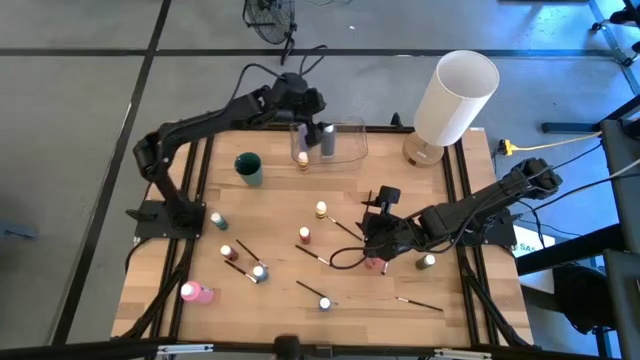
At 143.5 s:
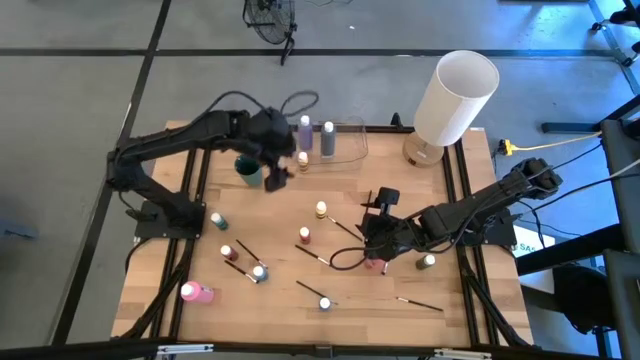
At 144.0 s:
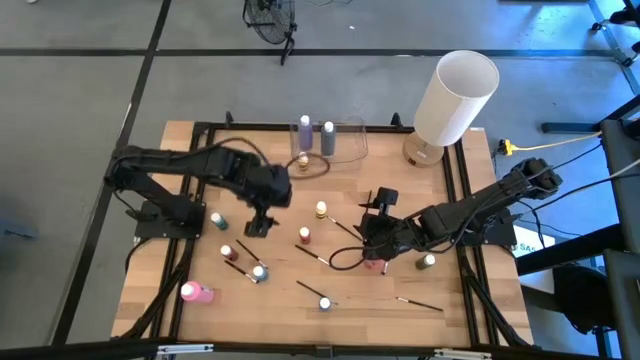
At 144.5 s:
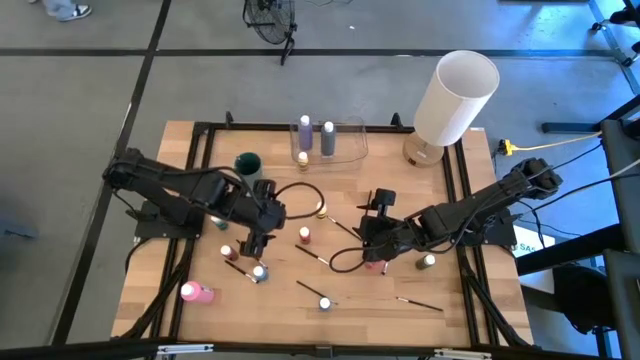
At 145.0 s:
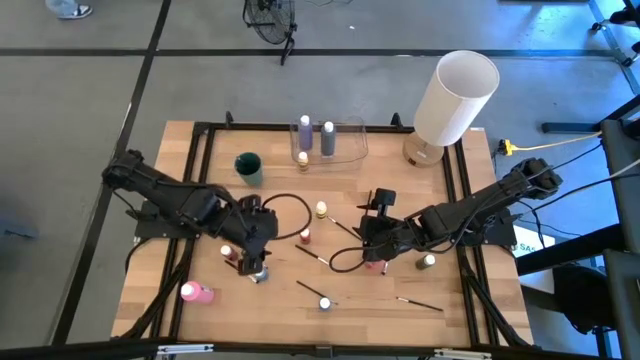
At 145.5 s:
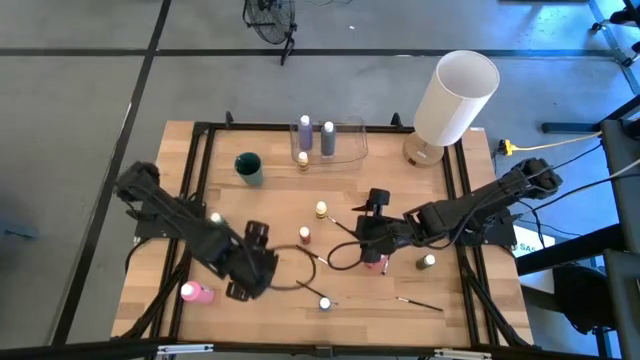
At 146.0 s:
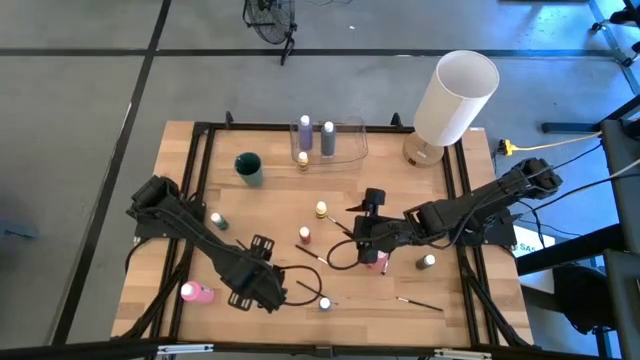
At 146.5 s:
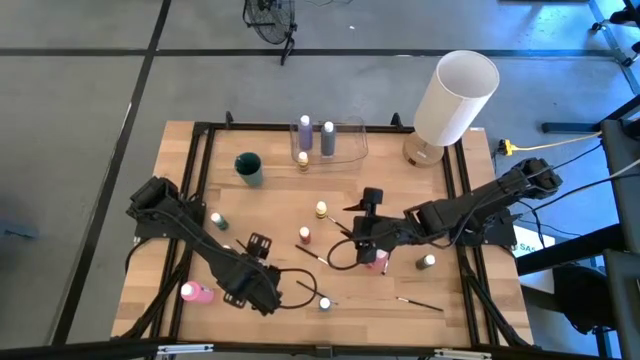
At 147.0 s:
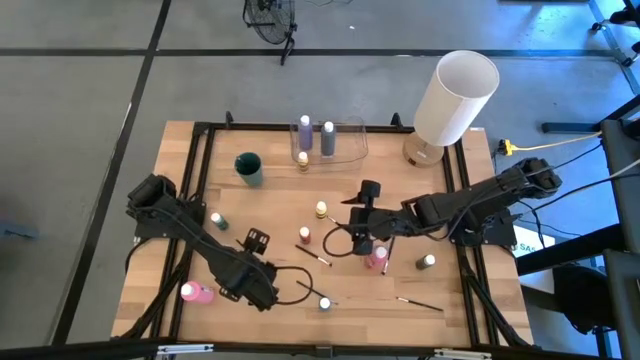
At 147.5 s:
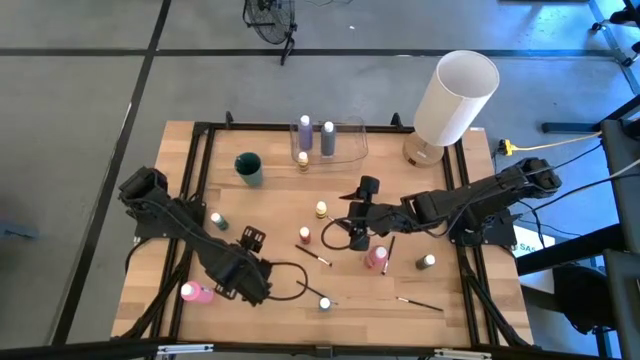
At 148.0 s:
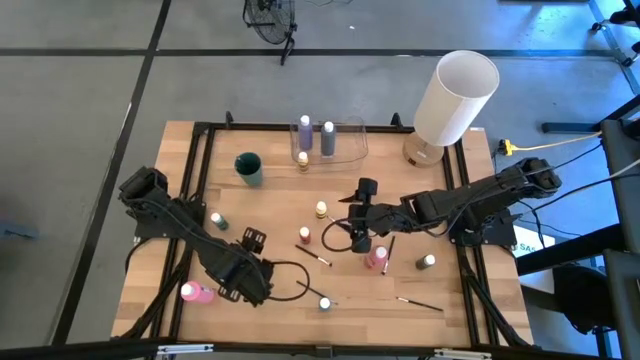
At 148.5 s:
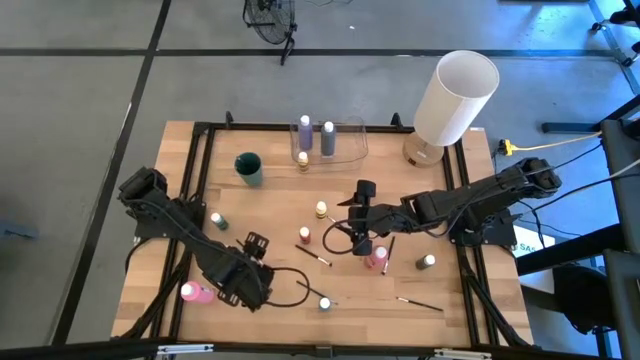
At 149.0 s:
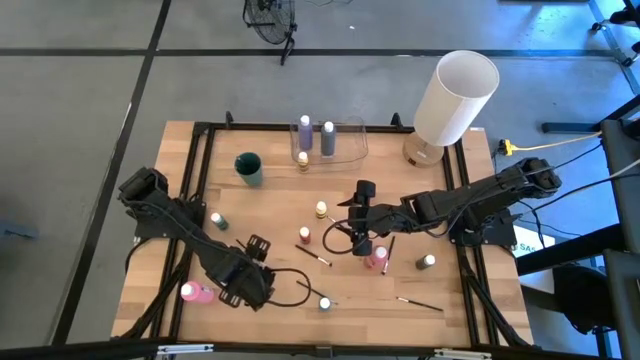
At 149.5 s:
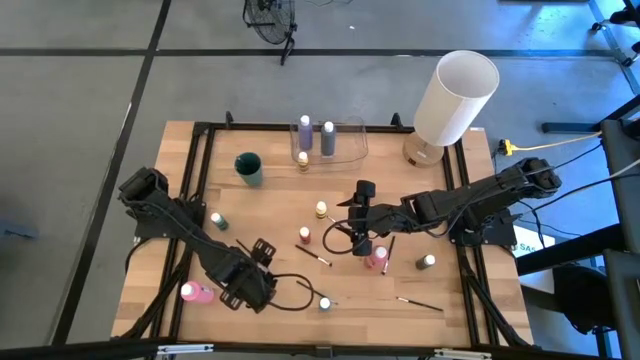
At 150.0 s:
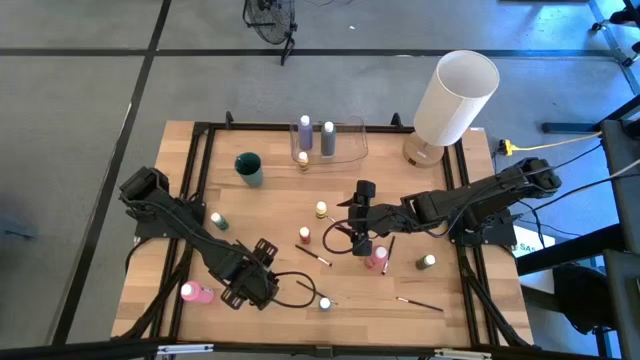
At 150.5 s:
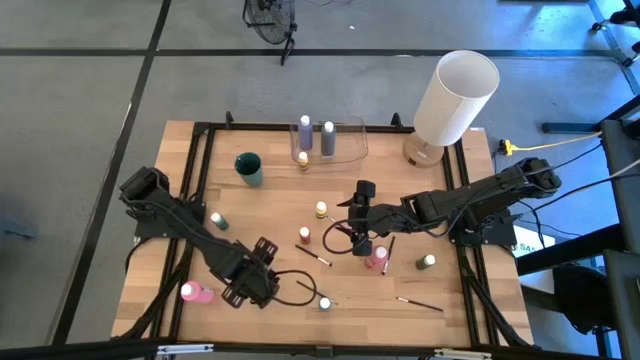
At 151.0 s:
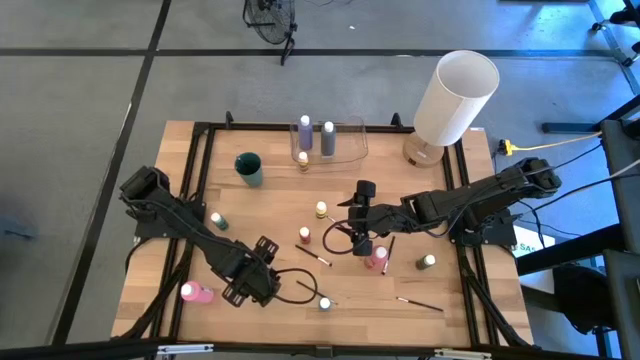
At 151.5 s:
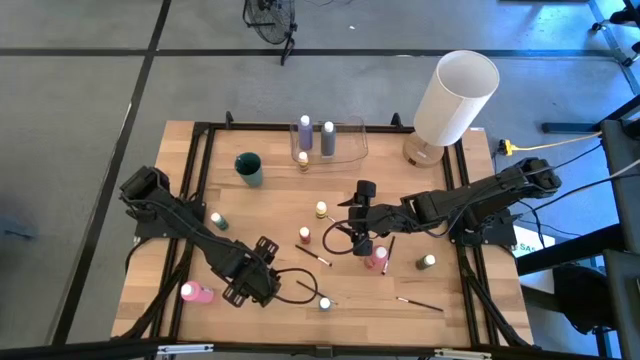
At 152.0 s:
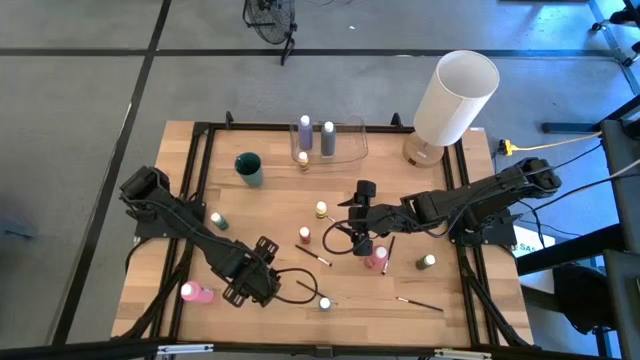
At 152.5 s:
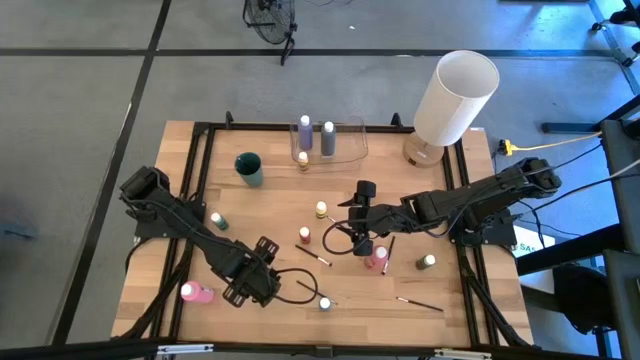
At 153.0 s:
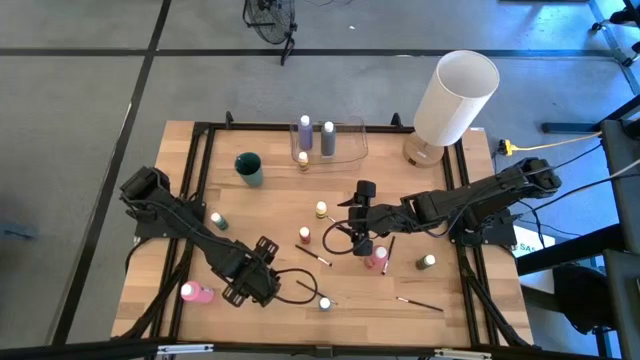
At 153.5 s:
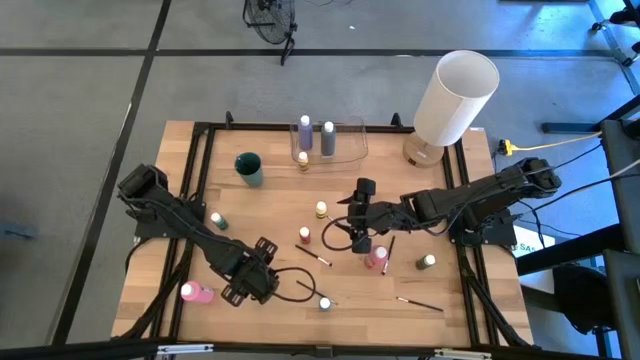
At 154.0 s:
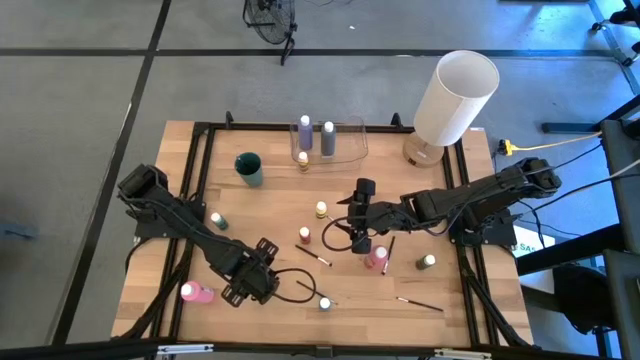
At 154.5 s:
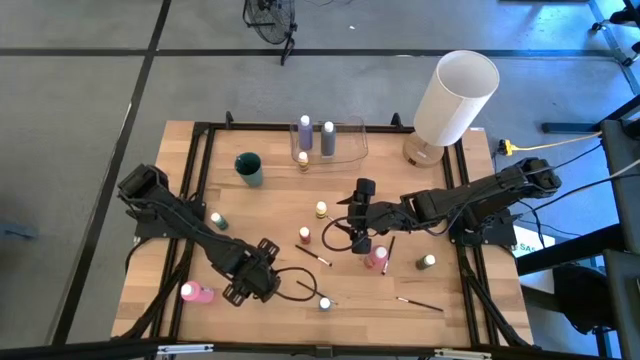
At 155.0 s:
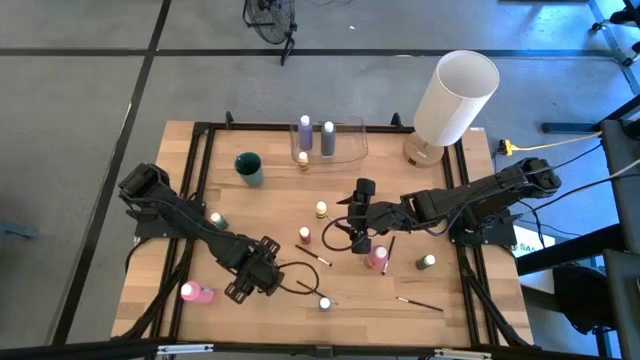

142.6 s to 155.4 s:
Task: Pick & Place Paint Supplies
Put the blue paint bottle into the transparent bin

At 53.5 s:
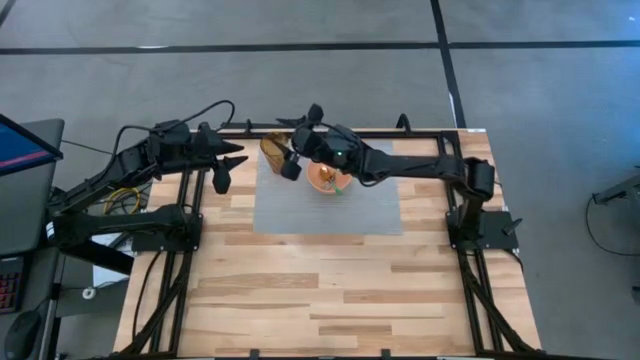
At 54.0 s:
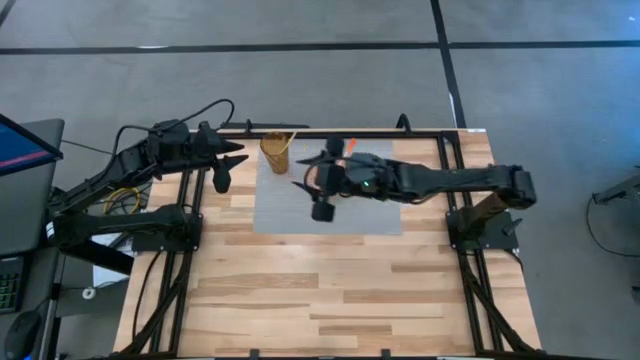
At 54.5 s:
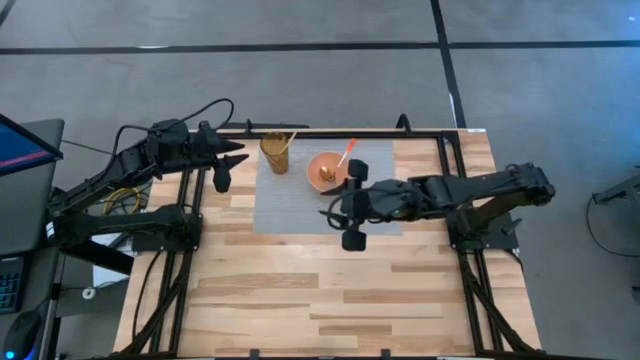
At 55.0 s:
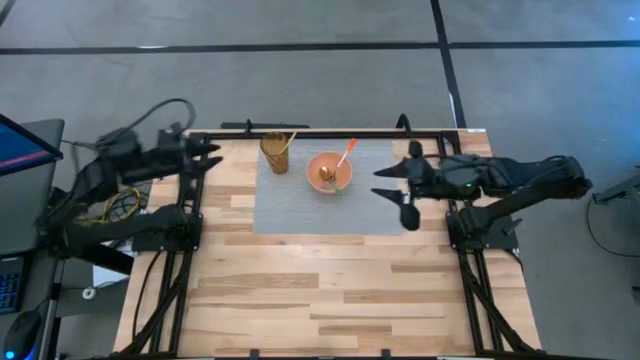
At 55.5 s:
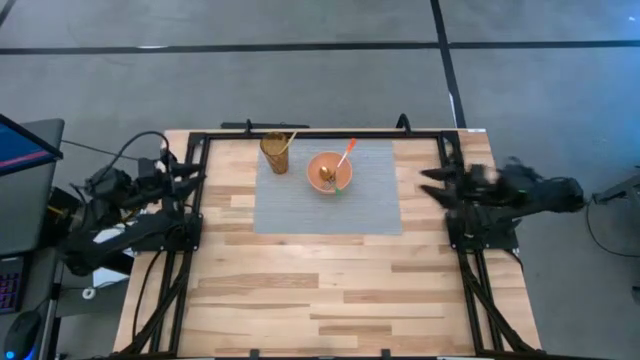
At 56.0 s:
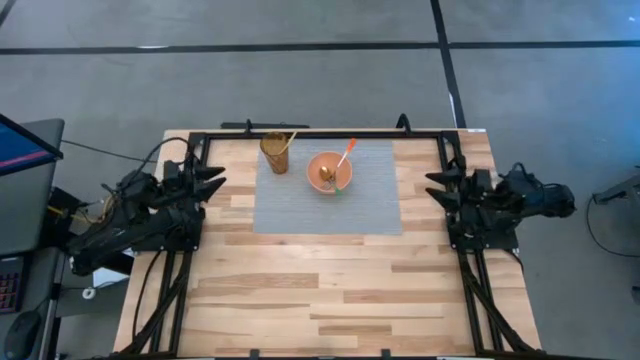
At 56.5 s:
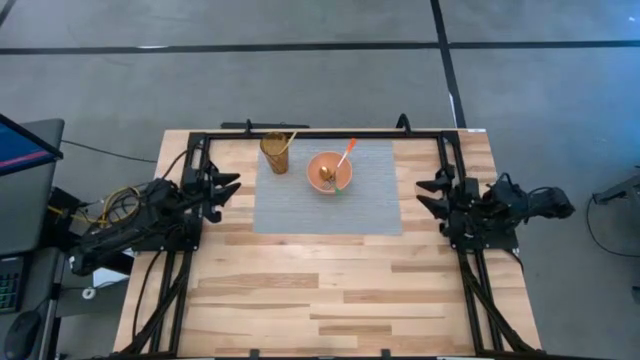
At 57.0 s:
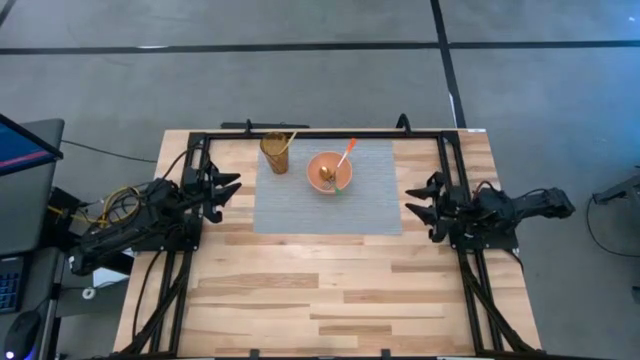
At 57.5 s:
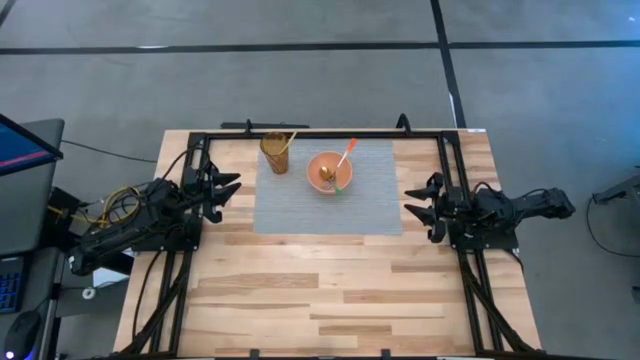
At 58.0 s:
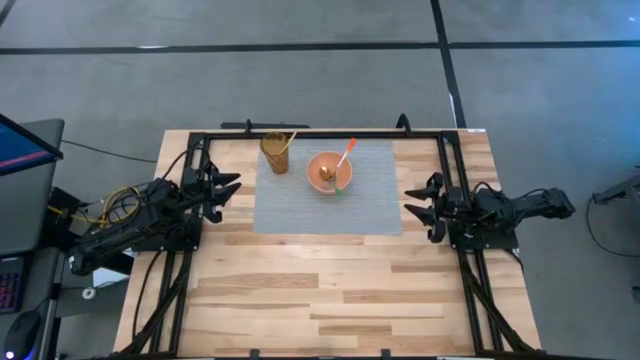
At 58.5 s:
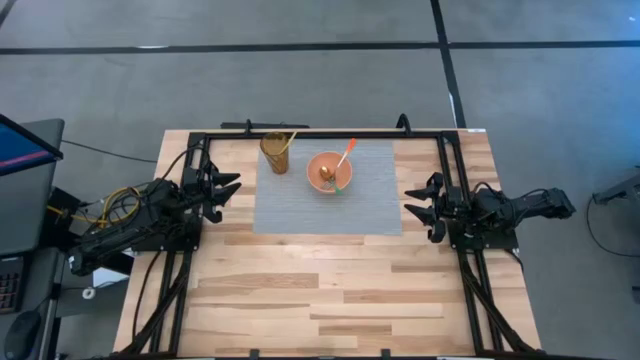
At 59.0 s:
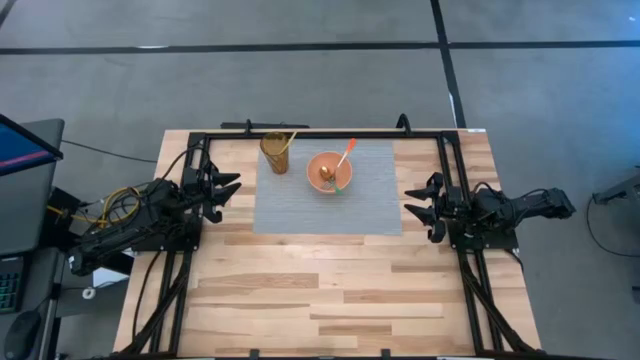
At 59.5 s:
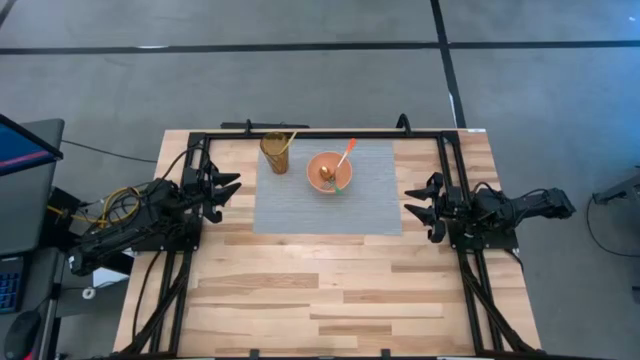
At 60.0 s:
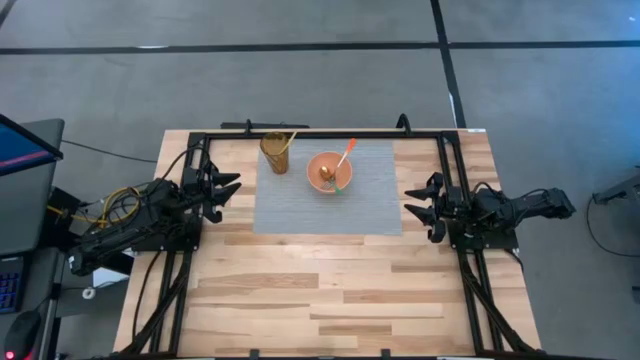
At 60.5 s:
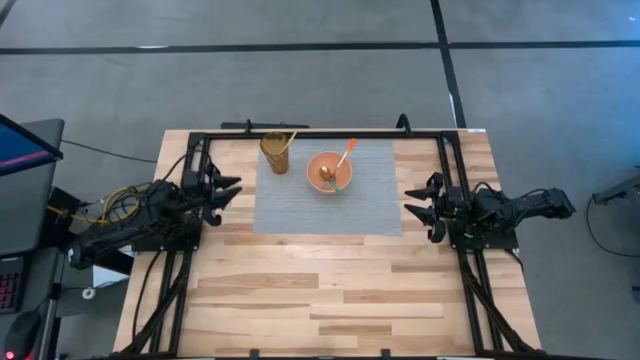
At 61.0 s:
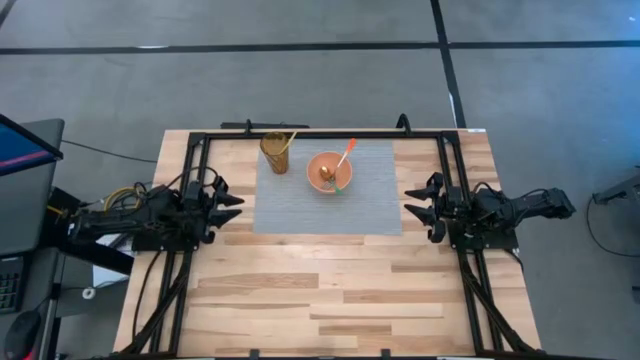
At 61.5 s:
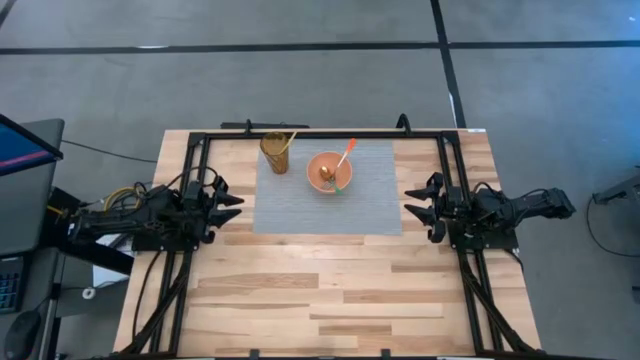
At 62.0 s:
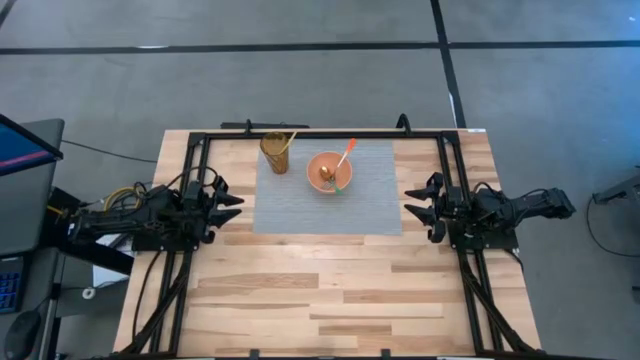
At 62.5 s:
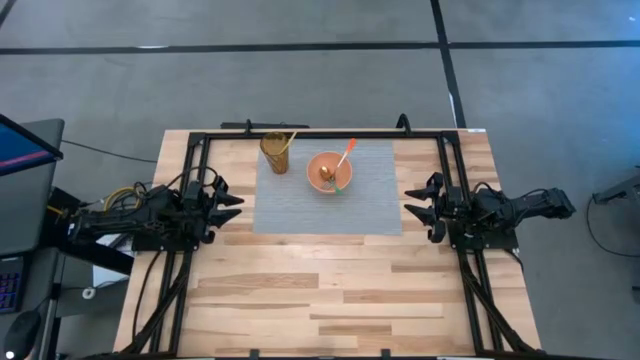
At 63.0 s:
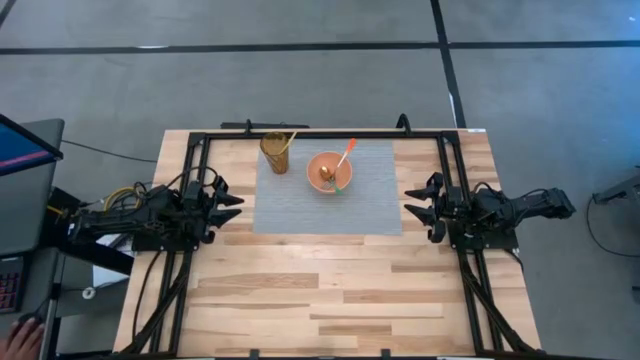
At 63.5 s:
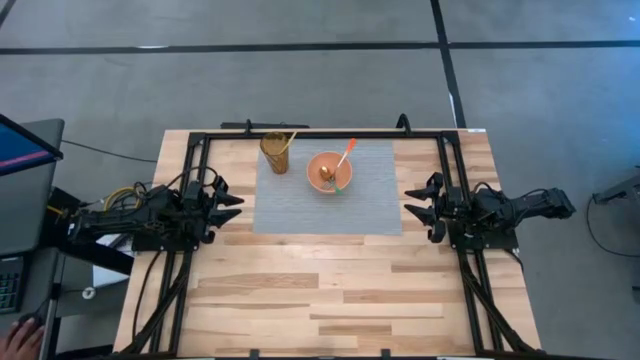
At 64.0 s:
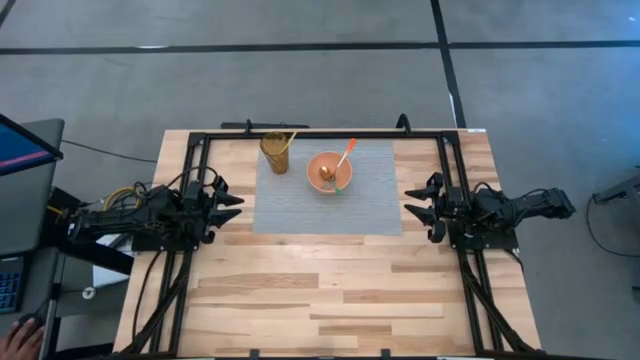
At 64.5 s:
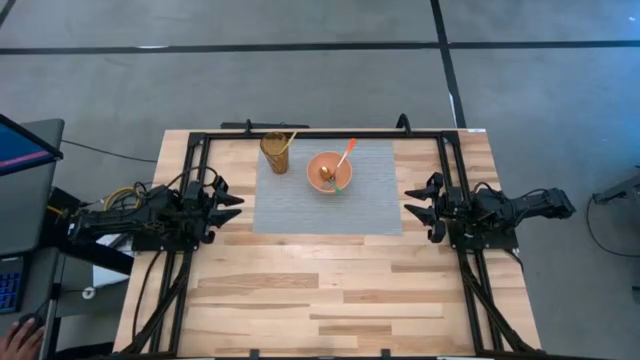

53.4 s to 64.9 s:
Task: Pick & Place Utensil
Return to Home Position
